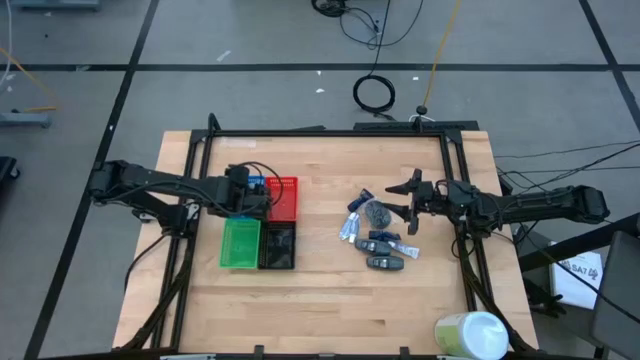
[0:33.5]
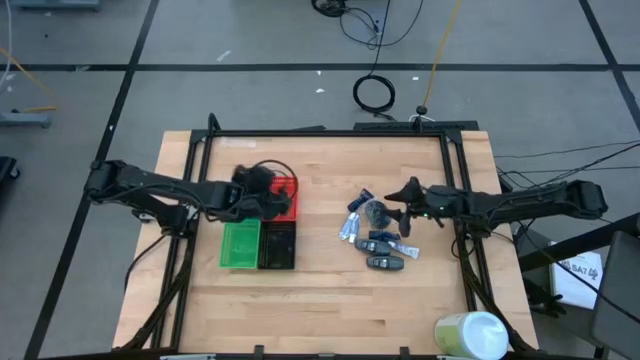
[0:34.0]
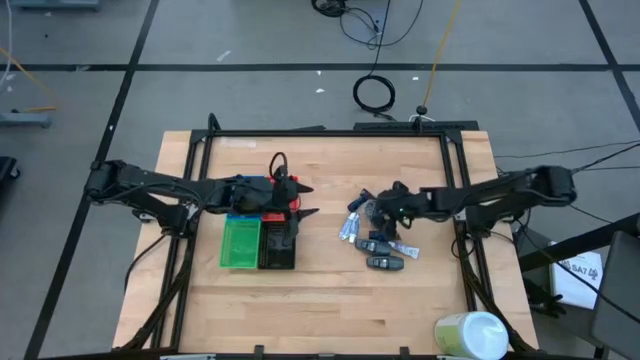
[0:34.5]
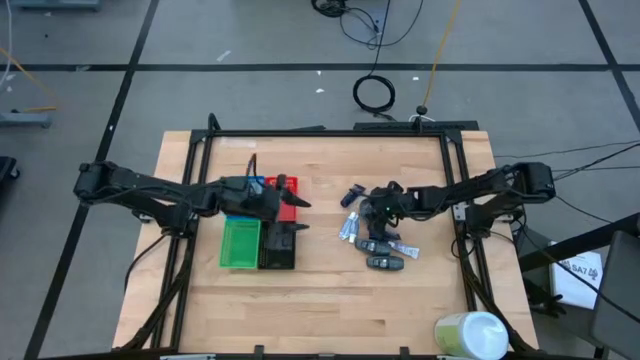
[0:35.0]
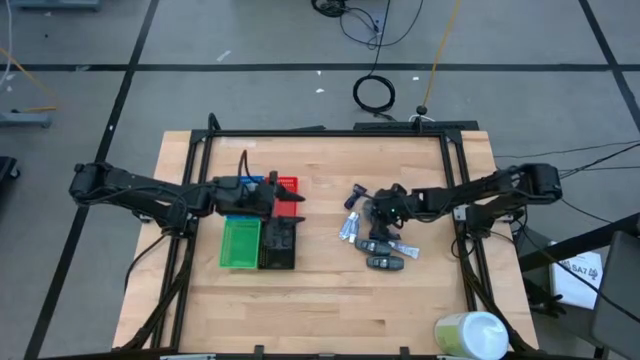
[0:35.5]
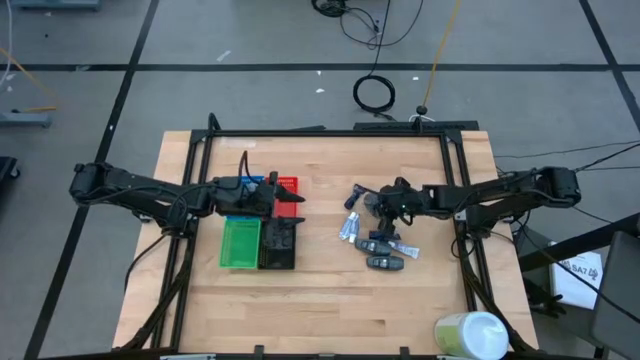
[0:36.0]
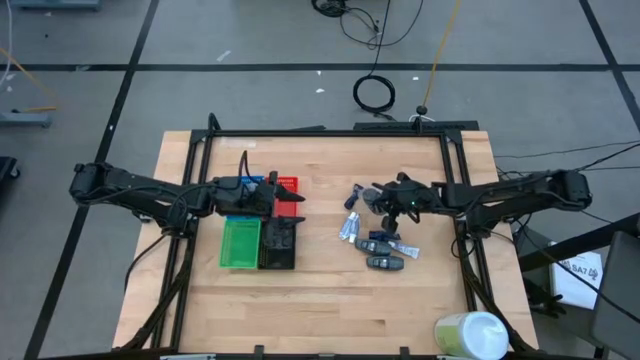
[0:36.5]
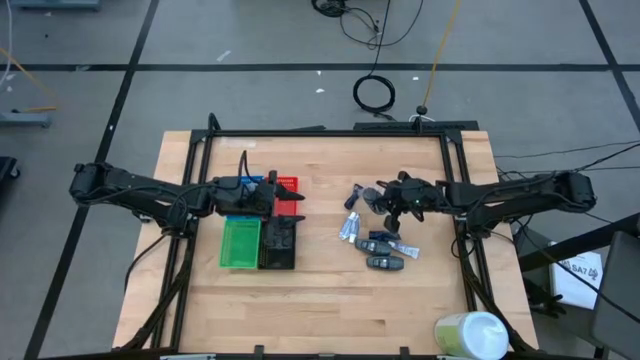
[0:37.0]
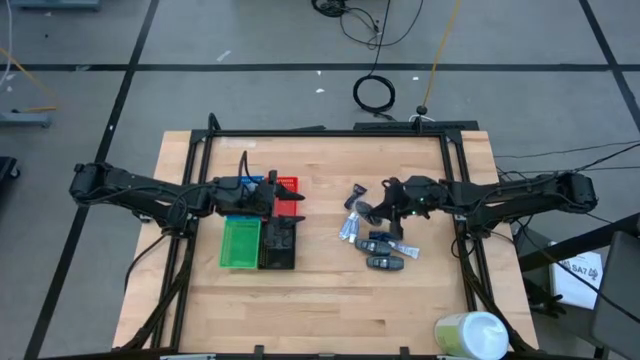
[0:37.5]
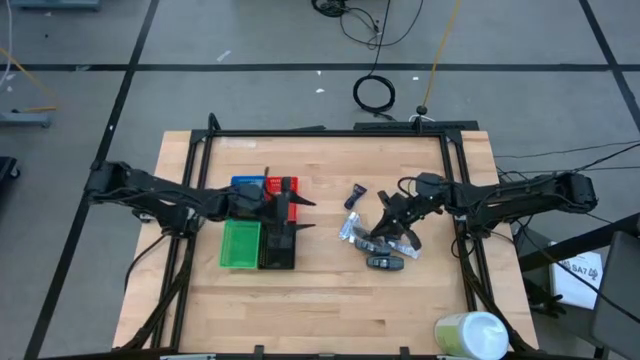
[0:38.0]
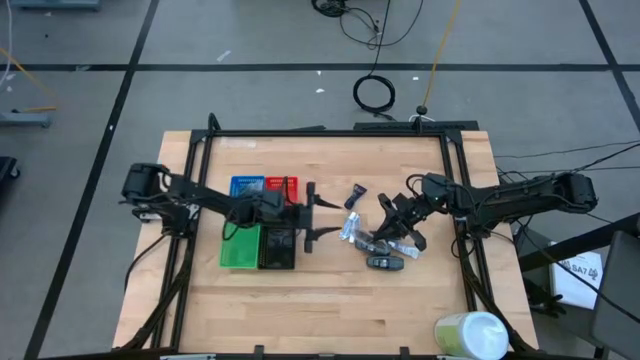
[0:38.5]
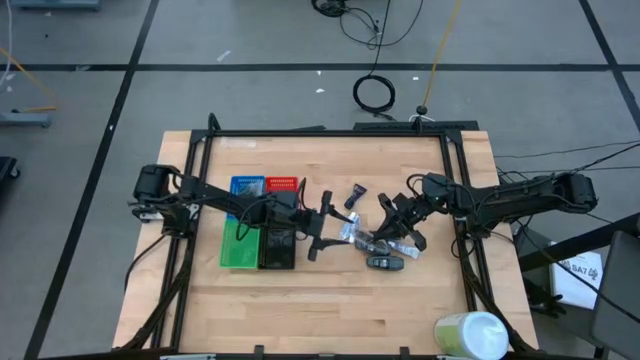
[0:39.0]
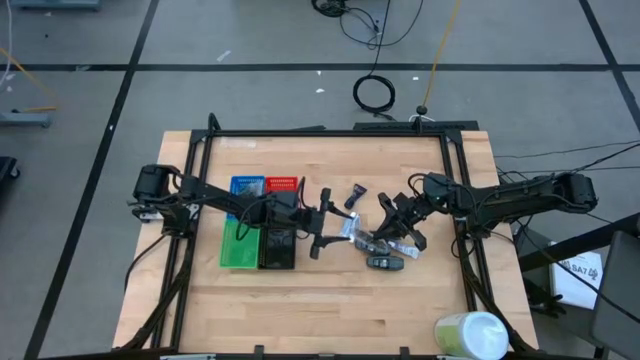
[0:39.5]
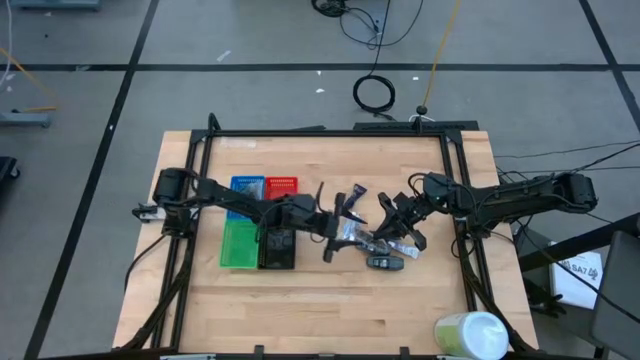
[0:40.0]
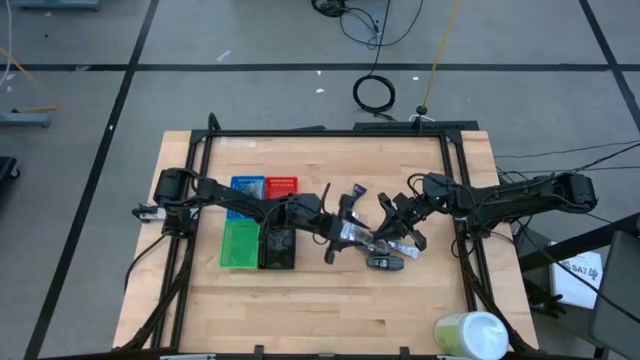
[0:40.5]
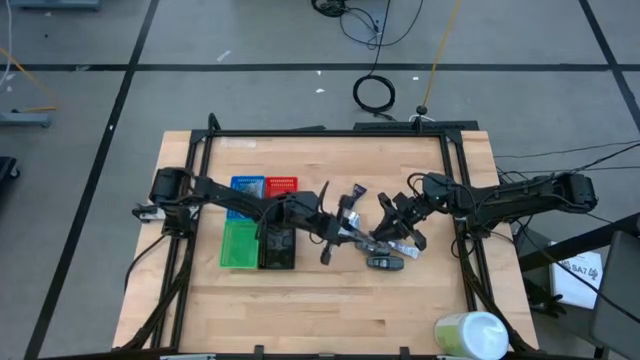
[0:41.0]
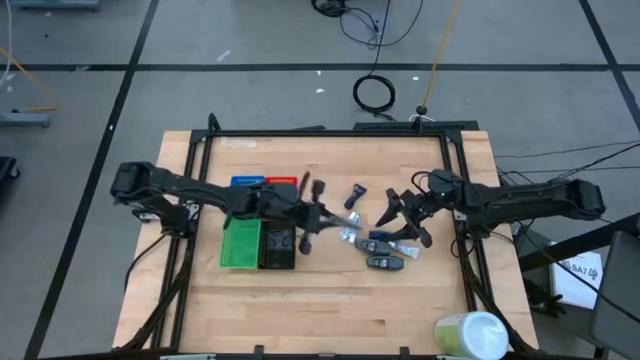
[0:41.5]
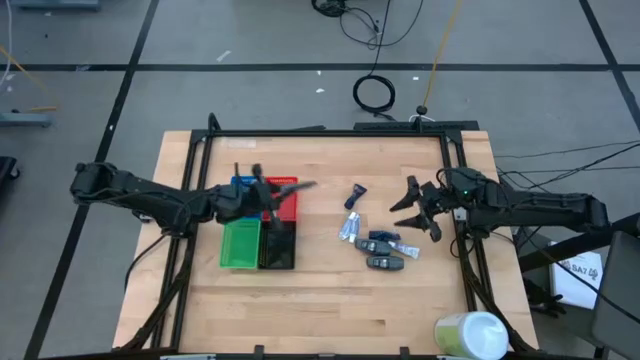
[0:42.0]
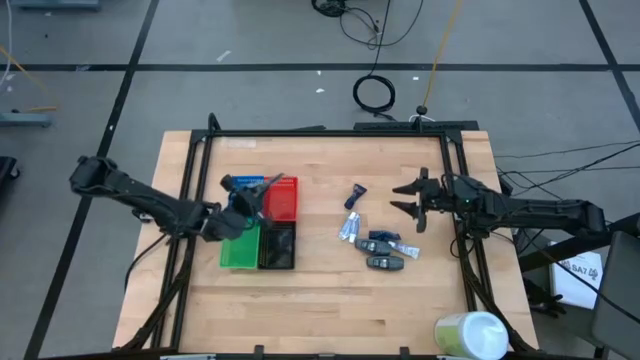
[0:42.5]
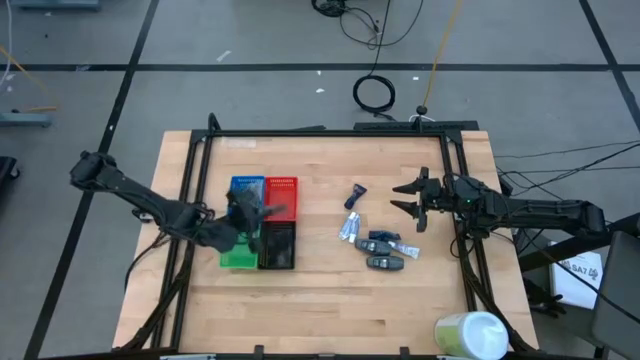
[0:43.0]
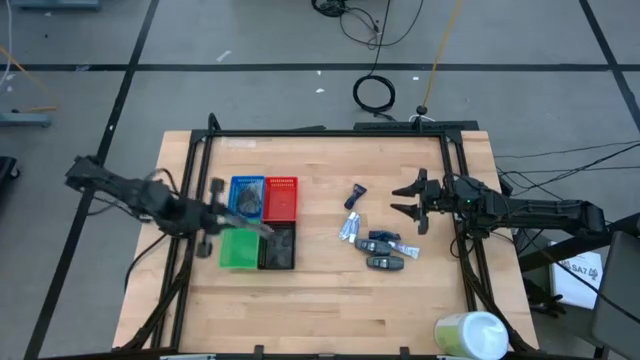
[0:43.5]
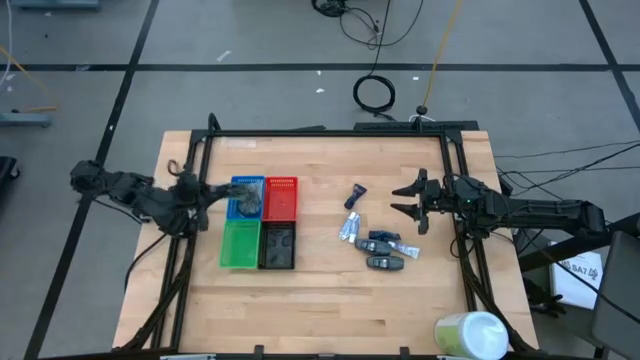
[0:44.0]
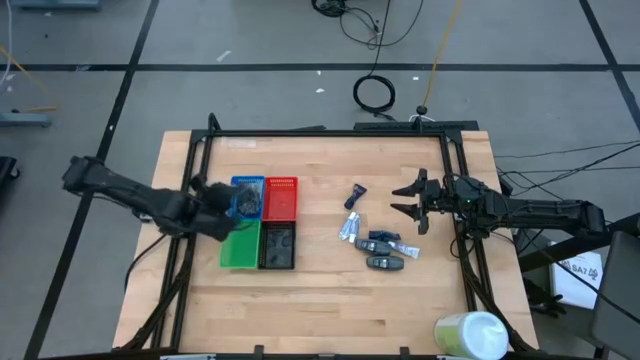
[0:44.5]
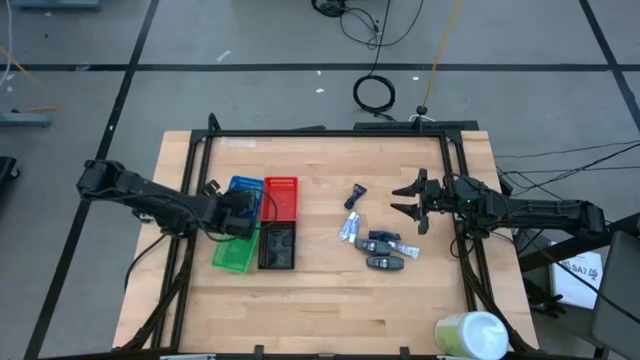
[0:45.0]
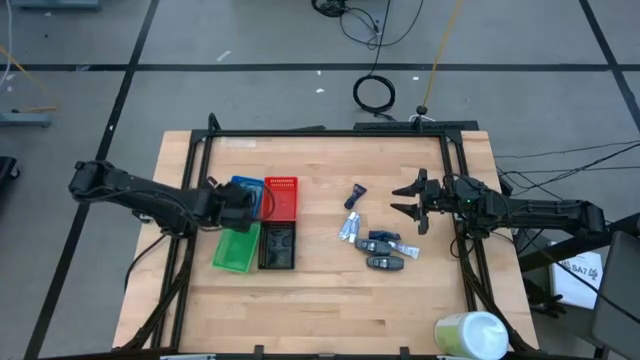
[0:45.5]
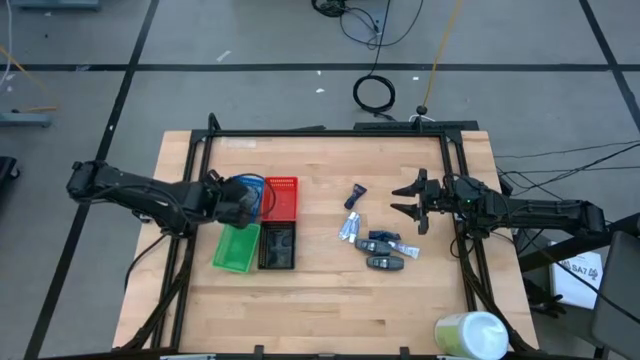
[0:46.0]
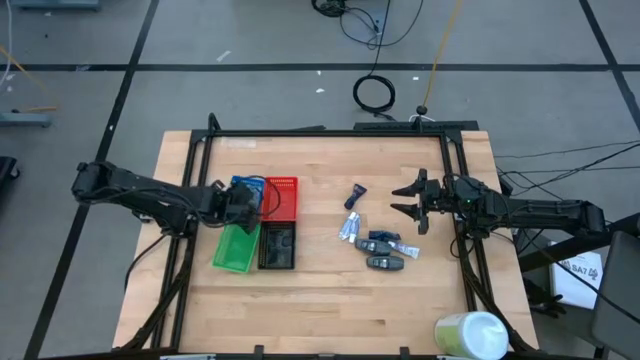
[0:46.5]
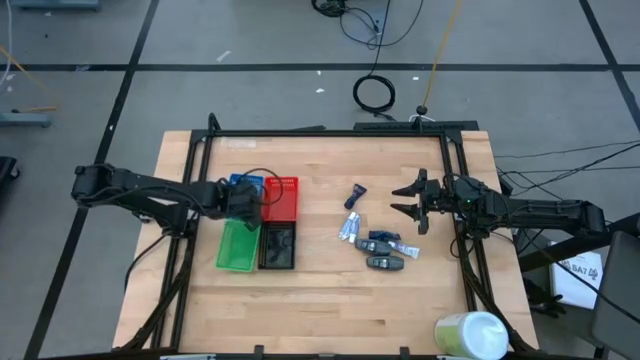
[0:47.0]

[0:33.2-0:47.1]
Task: Pick & Place Travel size toiletries
Put the black hairbrush into the blue bin

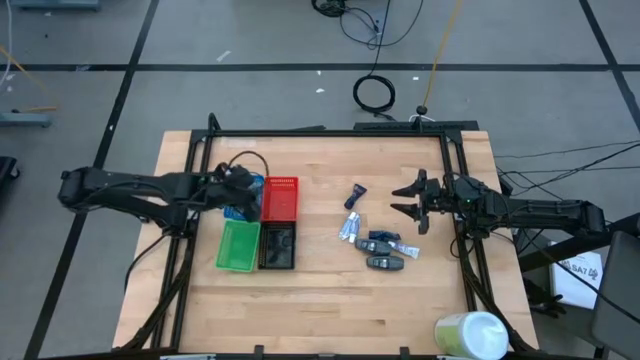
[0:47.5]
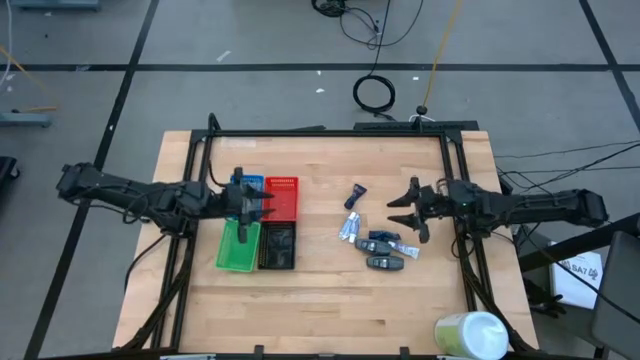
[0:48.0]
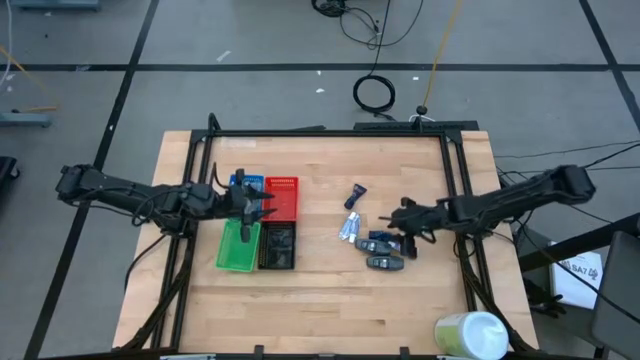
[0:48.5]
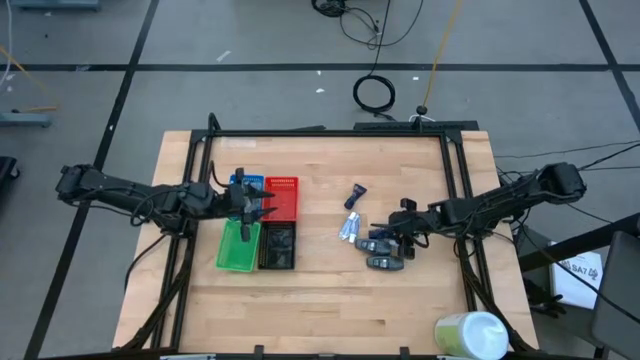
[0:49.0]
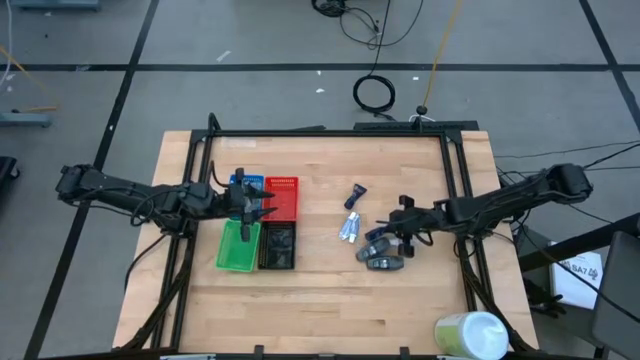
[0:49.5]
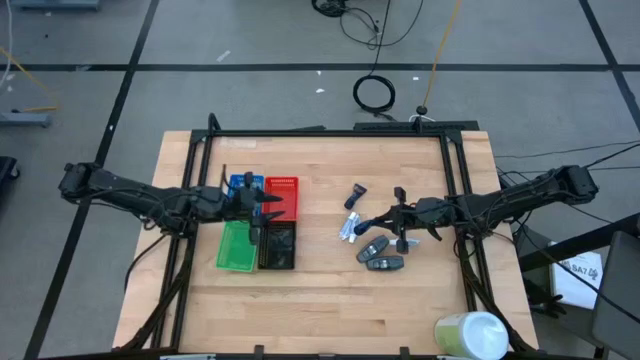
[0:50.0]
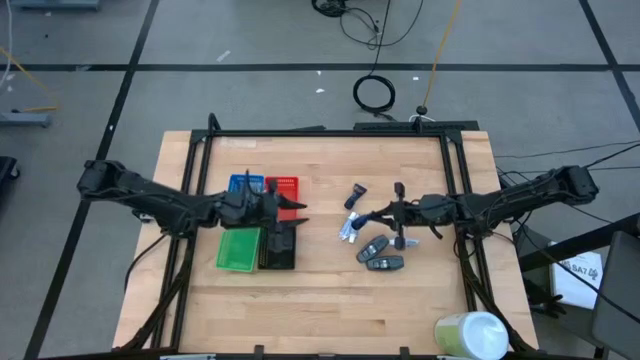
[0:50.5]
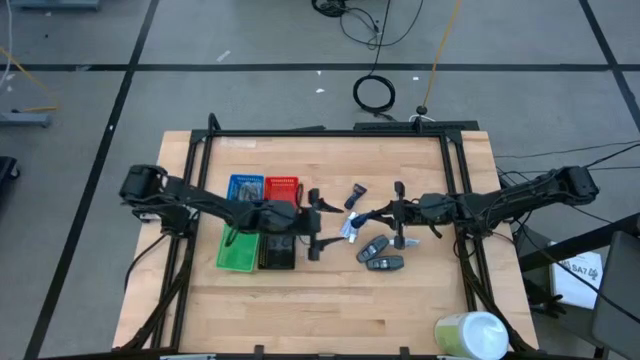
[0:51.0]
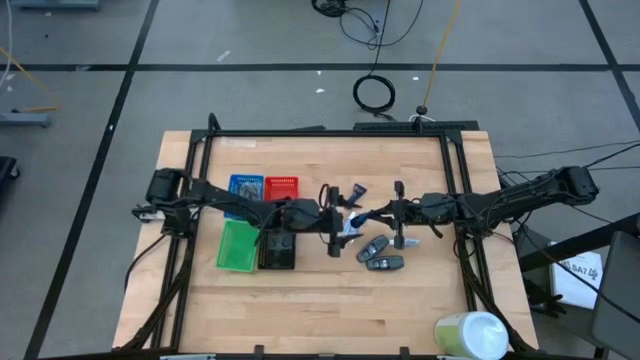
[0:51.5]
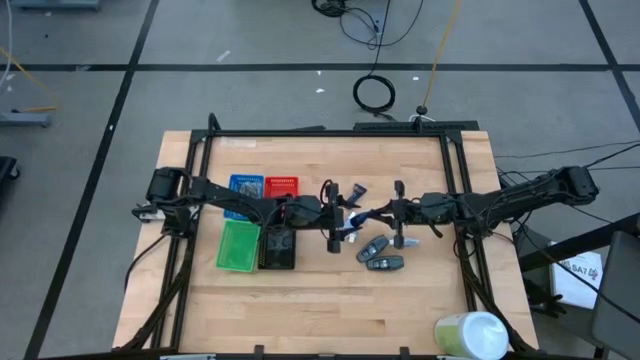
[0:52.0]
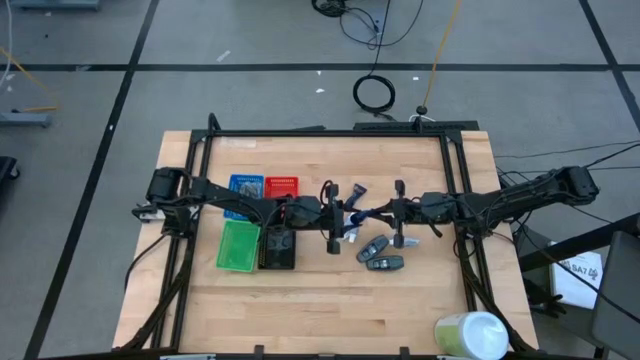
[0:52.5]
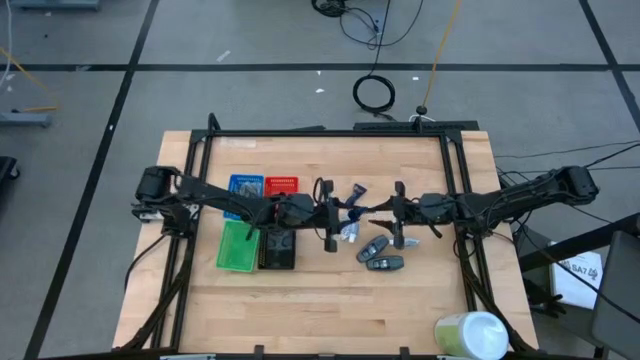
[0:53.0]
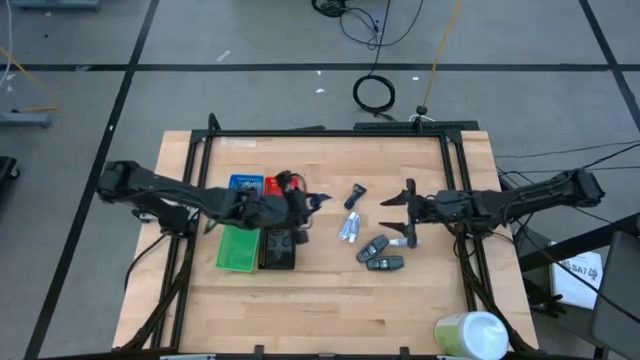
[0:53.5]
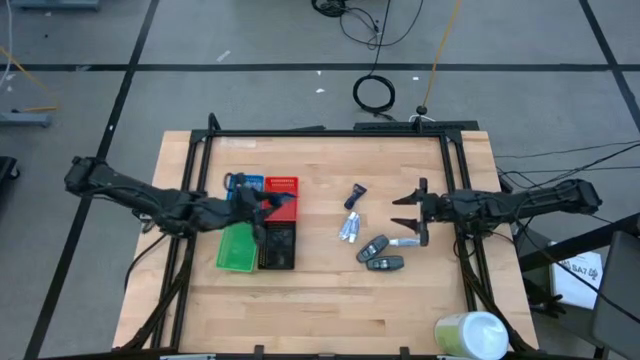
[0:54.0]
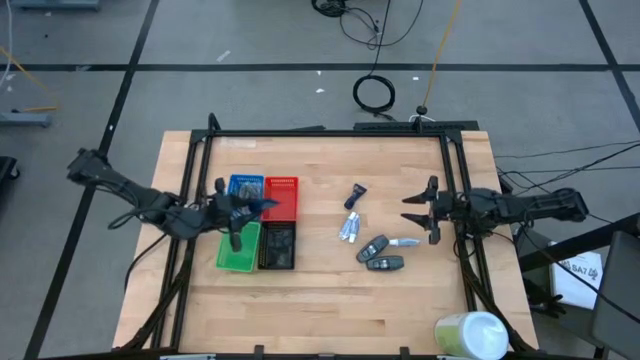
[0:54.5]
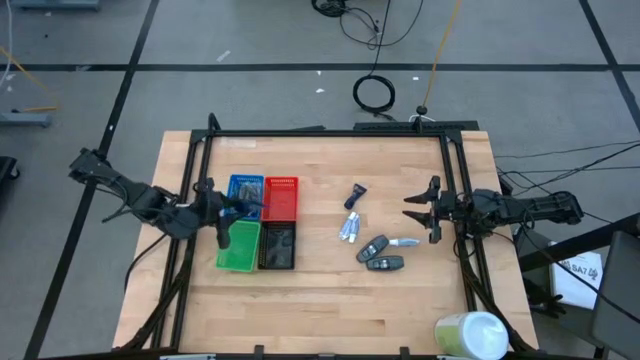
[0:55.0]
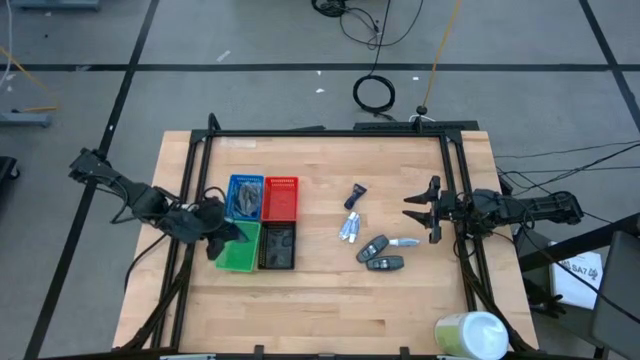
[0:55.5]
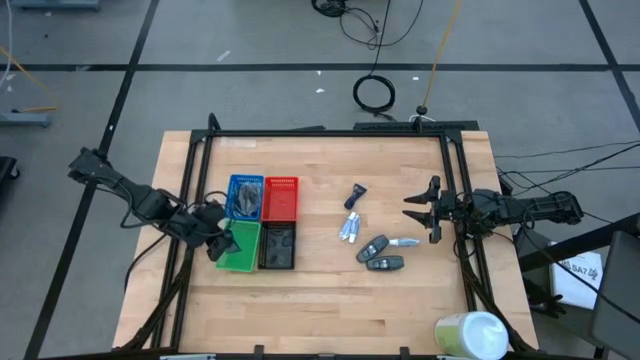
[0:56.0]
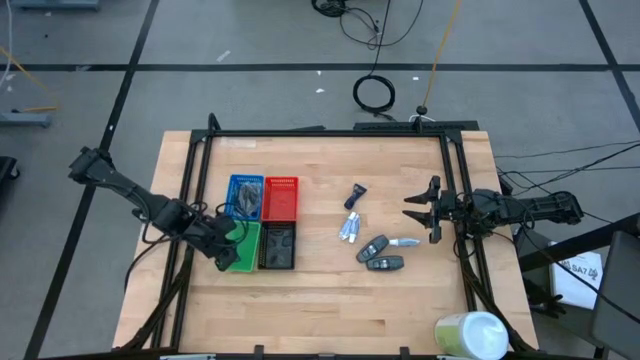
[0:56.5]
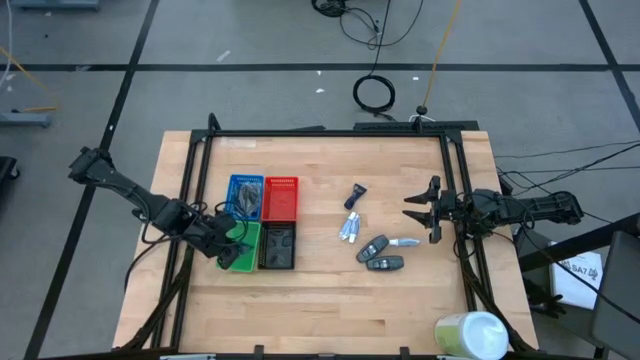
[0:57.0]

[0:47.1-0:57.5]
Put the bottom blue shave cream into the green bin
